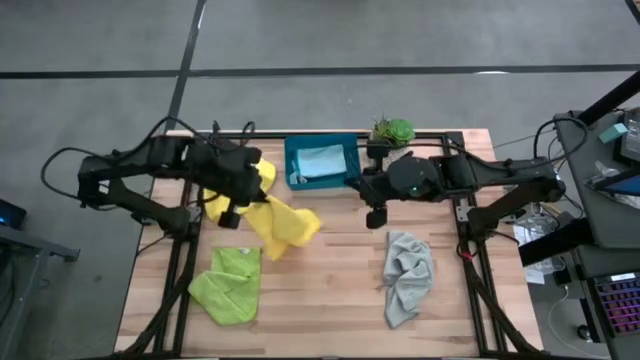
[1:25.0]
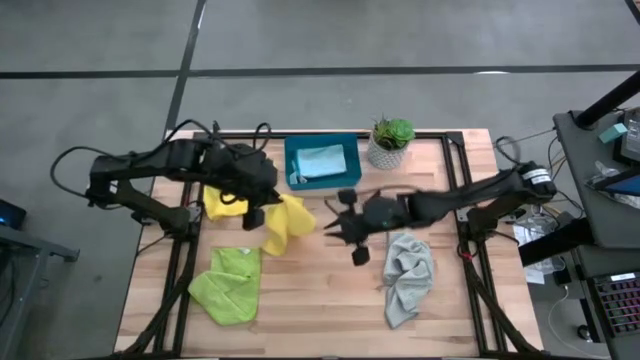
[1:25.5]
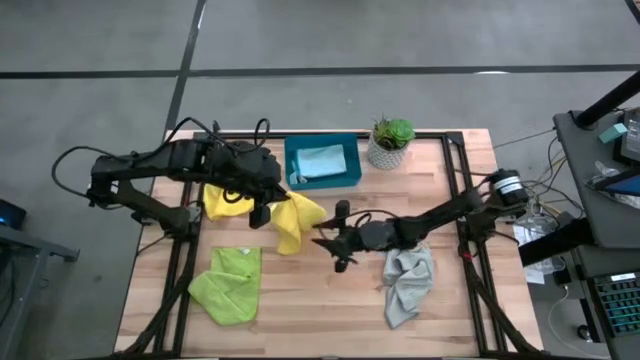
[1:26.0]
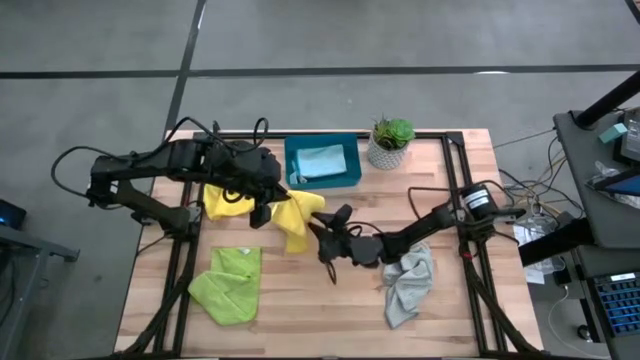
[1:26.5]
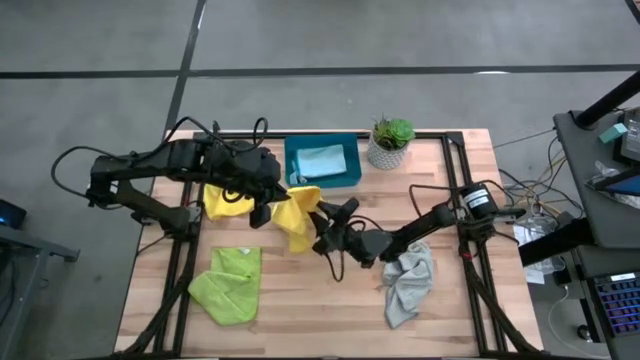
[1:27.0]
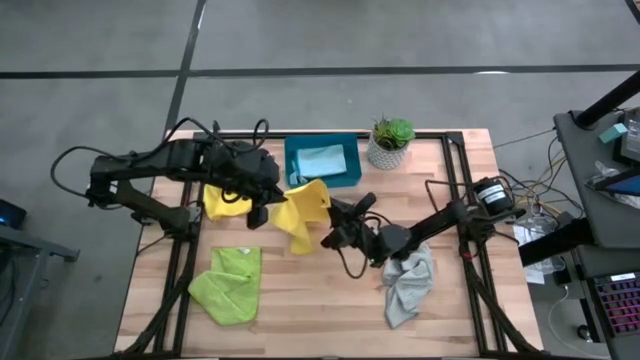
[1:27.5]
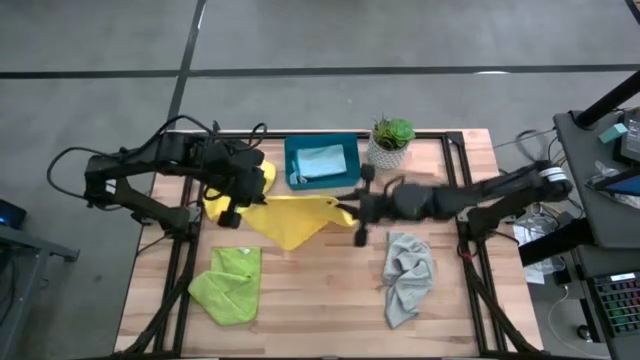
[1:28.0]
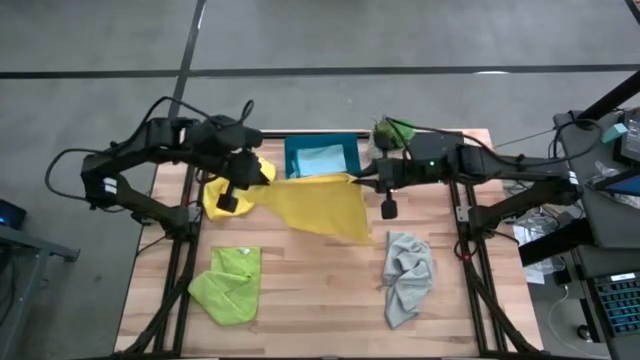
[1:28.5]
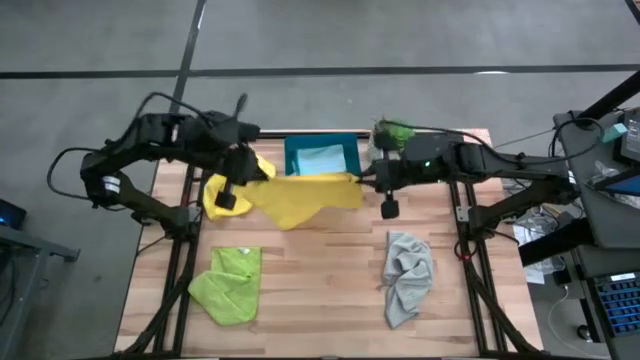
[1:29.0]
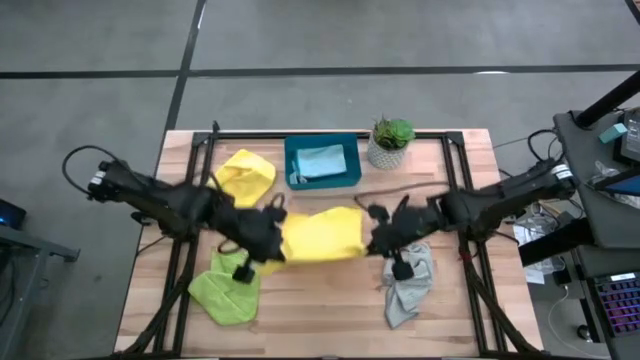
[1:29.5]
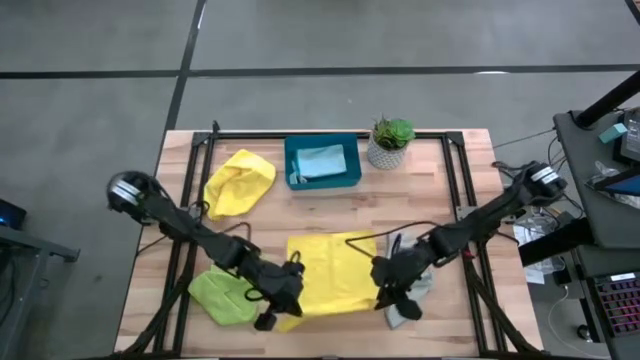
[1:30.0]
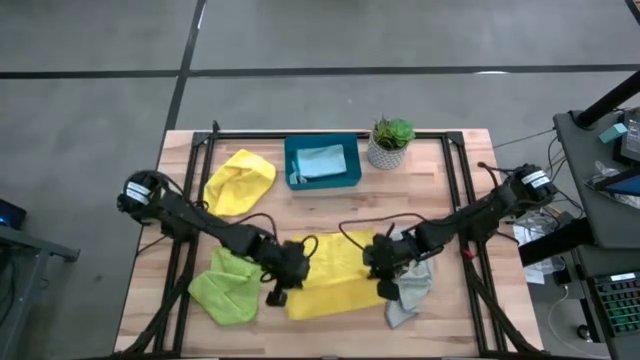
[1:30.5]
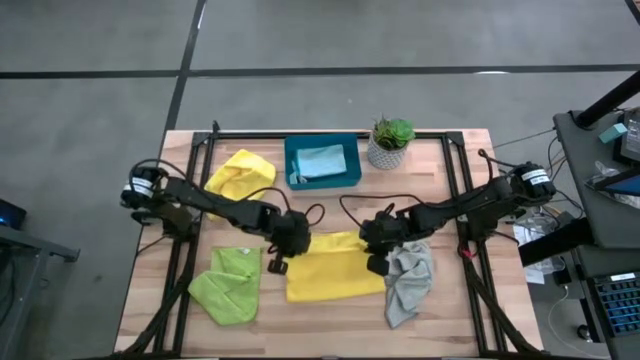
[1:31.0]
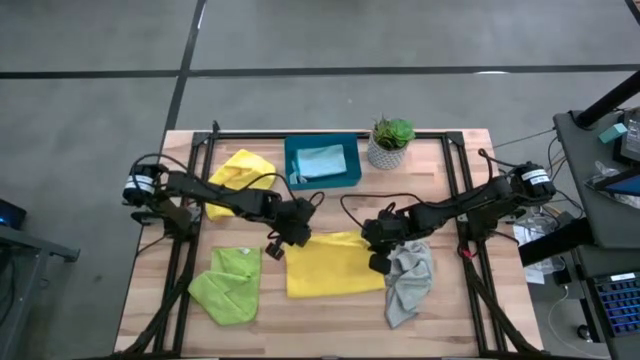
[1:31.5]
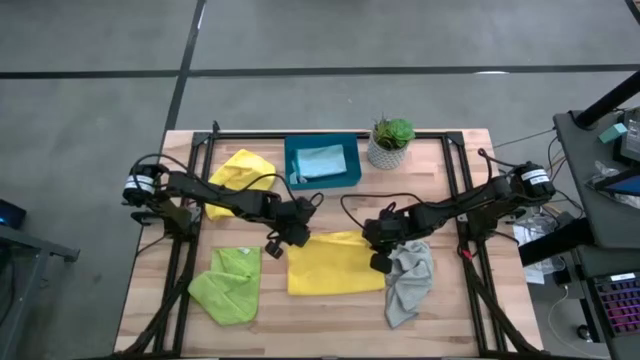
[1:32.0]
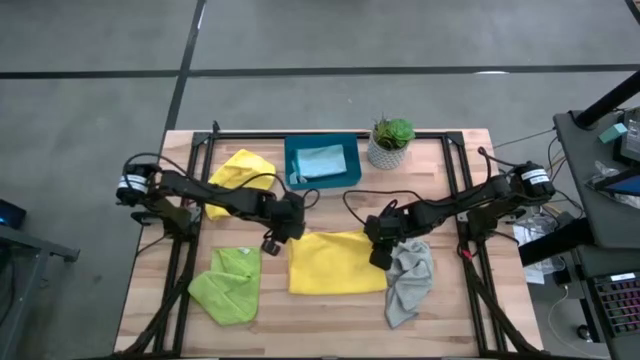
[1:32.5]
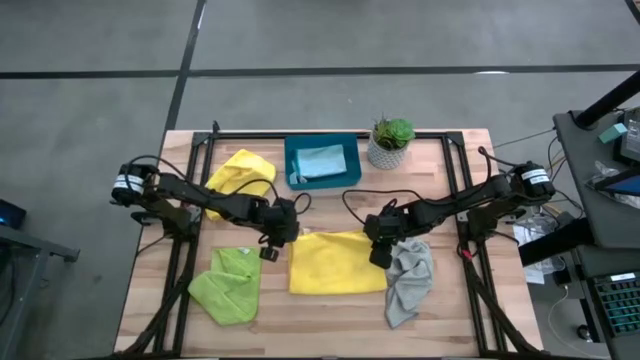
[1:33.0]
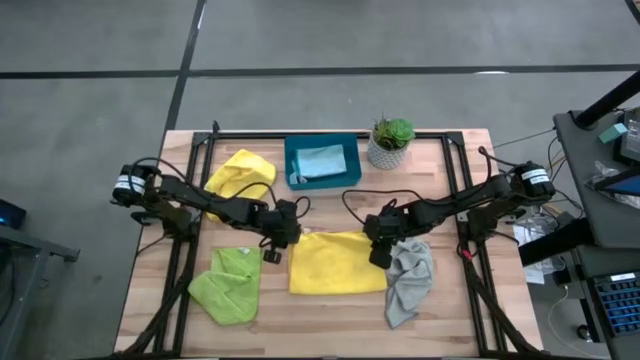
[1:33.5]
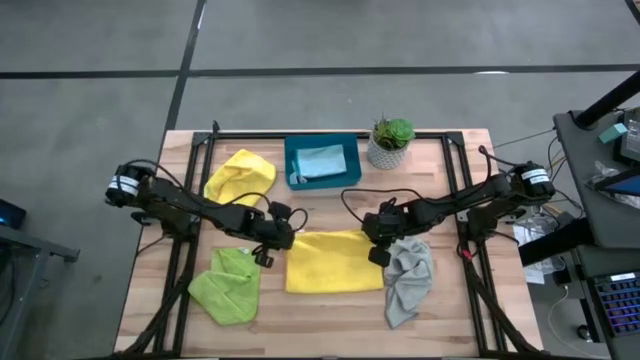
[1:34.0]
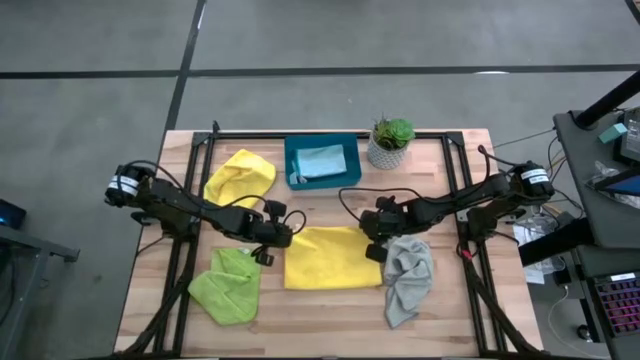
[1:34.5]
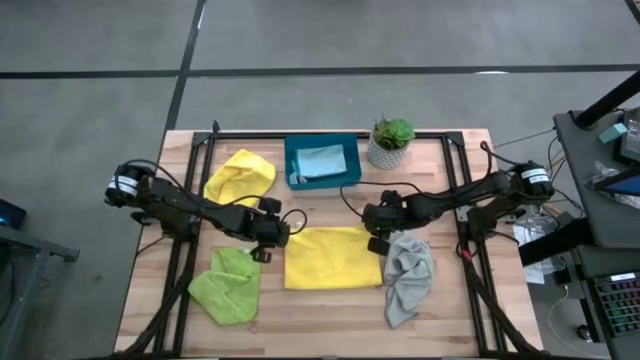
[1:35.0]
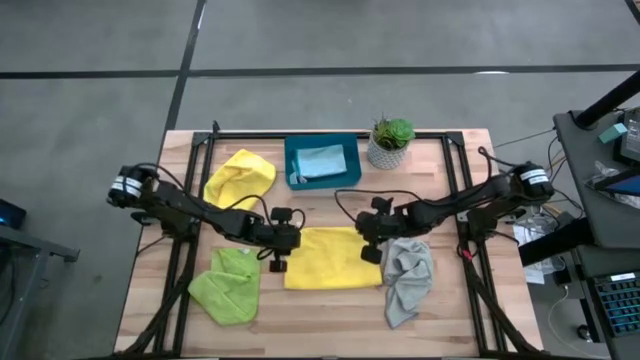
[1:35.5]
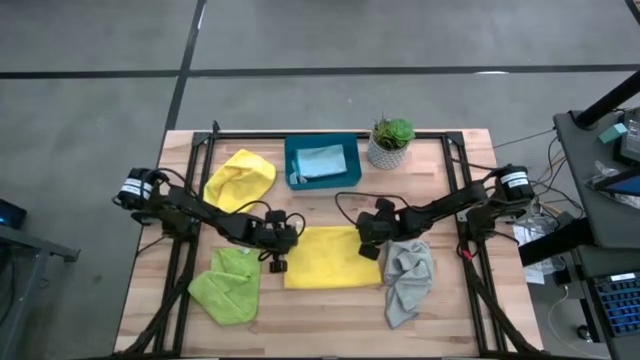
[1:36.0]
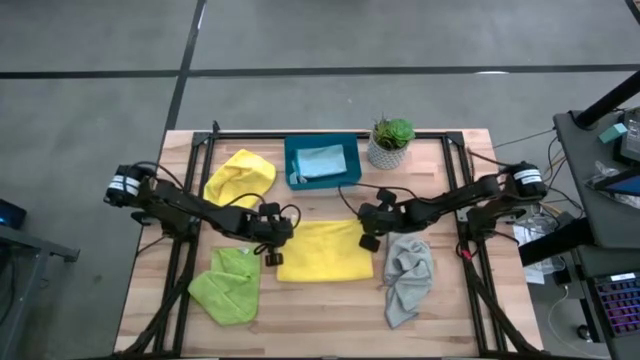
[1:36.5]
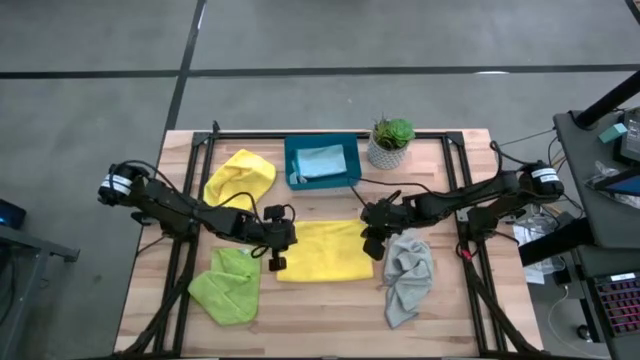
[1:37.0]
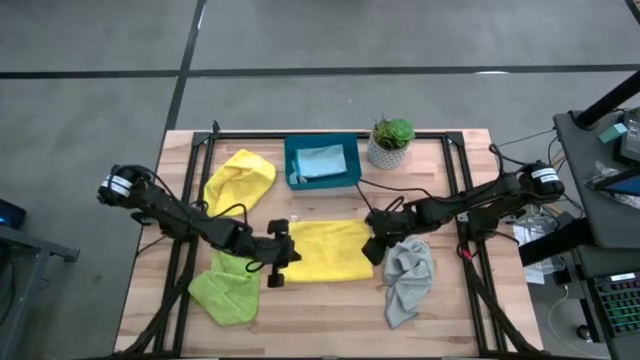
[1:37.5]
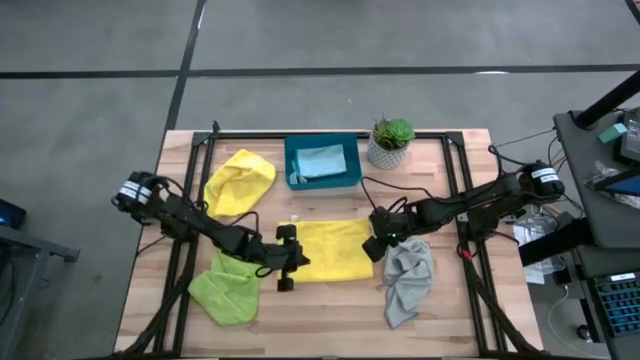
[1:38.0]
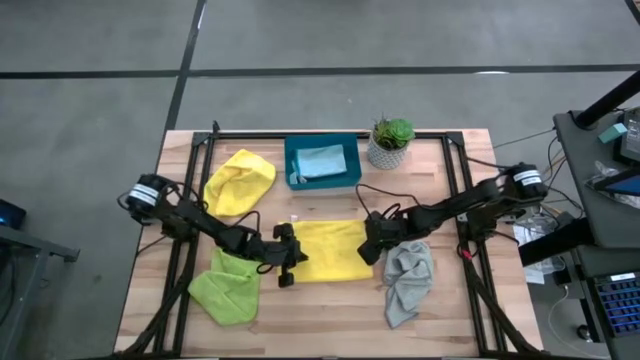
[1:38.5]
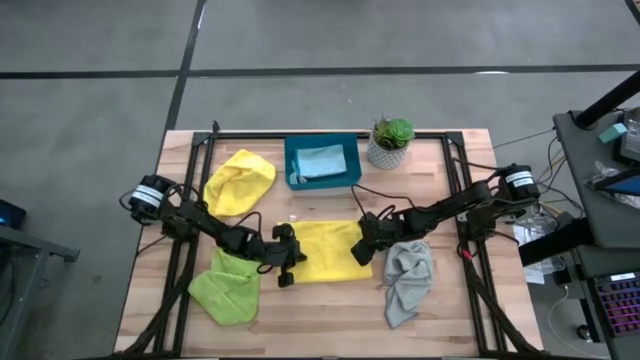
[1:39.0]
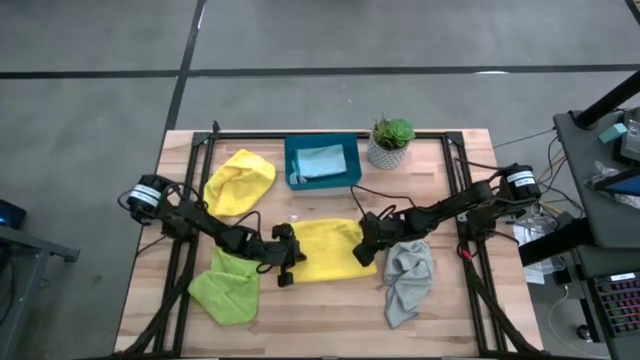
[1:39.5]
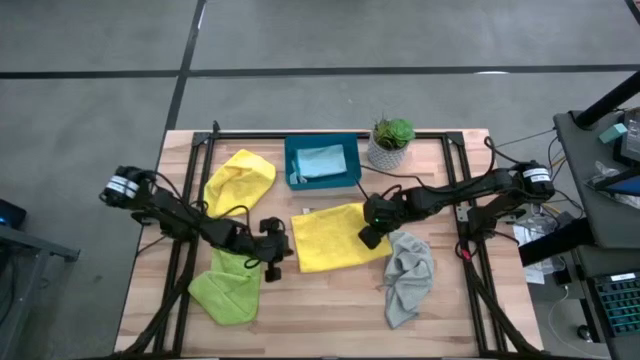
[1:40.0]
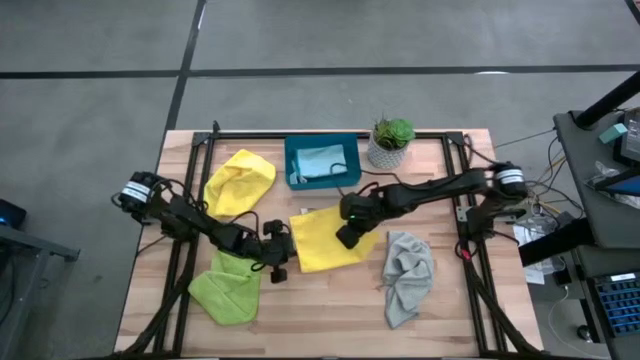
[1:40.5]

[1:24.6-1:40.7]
Task: Fold microfiber towels
Fold the right yellow microfiber cloth

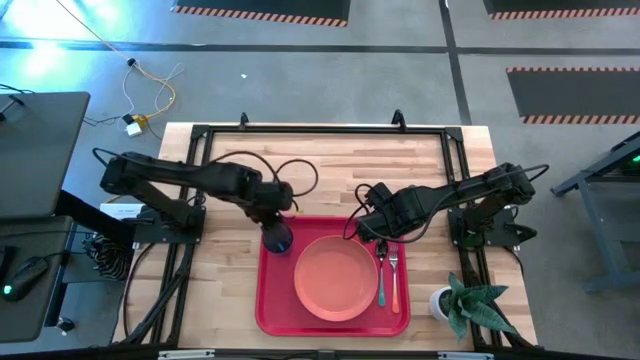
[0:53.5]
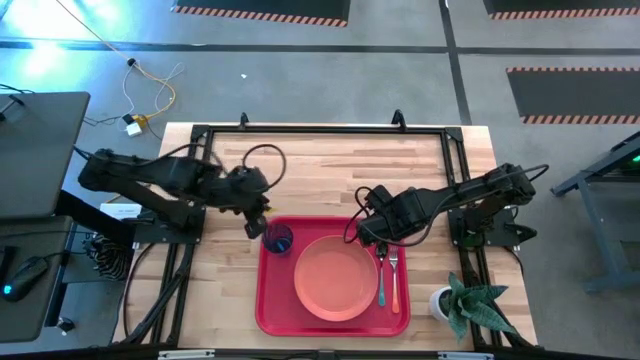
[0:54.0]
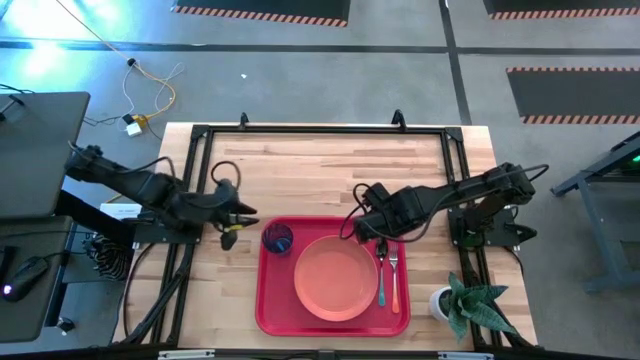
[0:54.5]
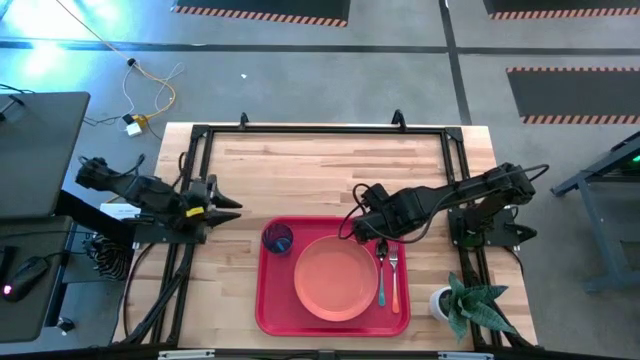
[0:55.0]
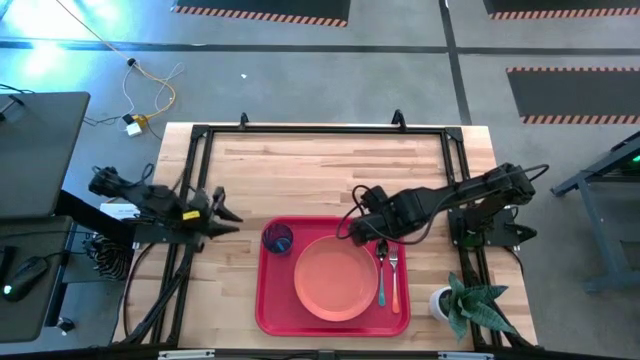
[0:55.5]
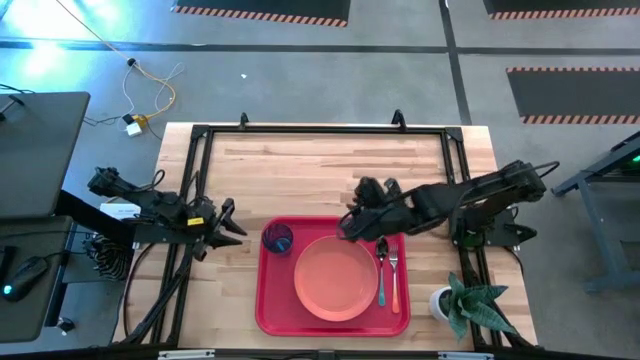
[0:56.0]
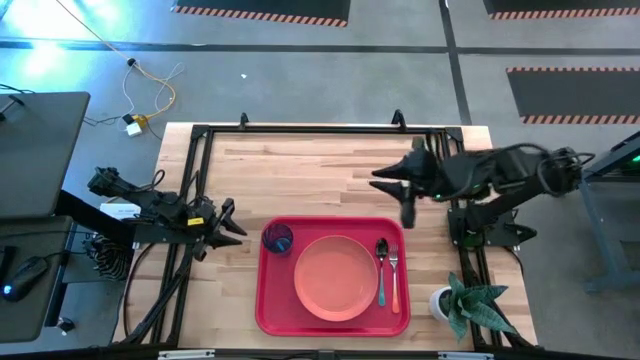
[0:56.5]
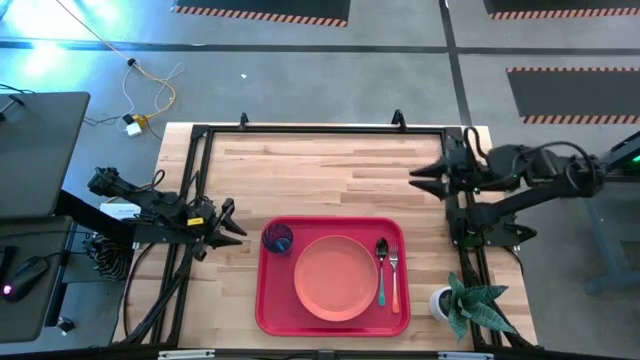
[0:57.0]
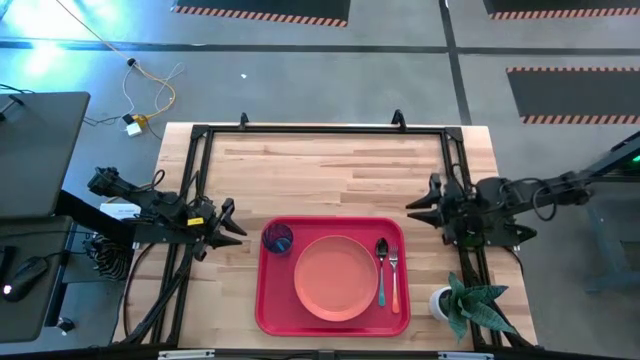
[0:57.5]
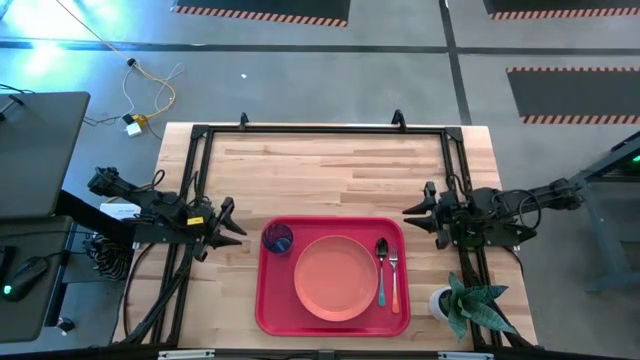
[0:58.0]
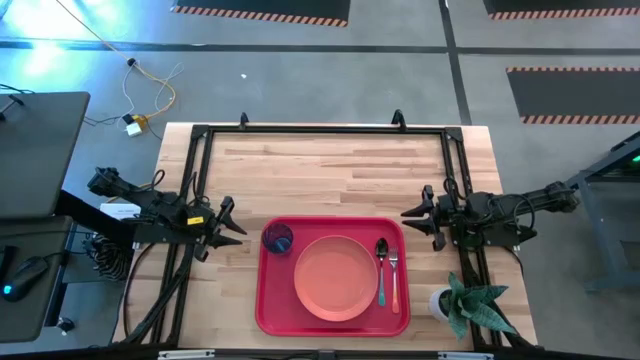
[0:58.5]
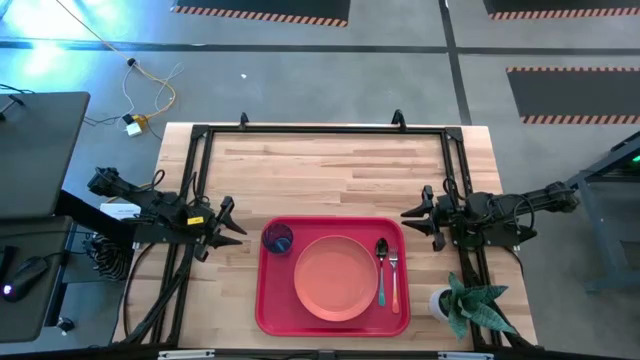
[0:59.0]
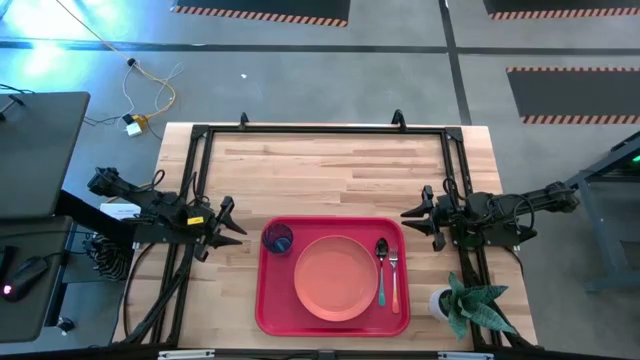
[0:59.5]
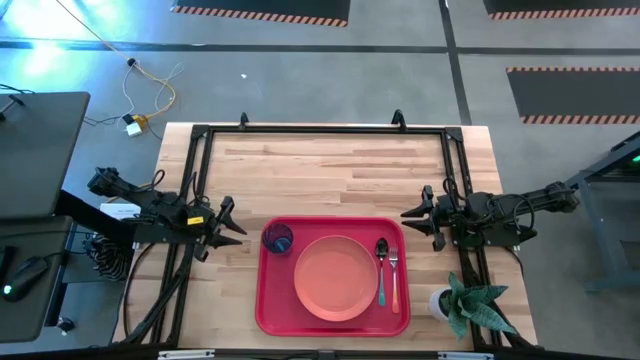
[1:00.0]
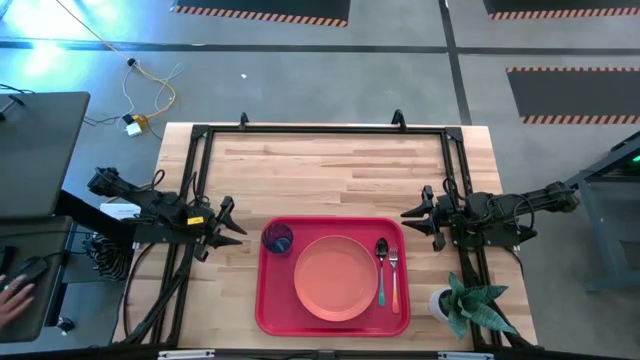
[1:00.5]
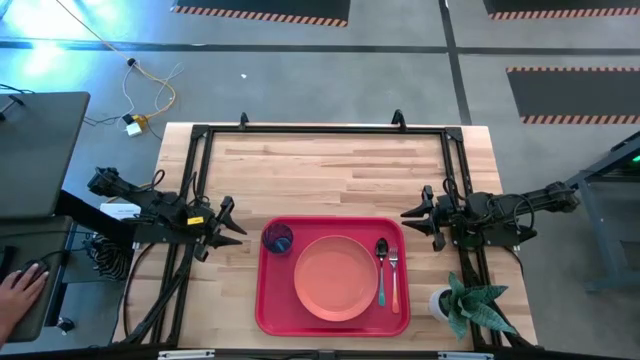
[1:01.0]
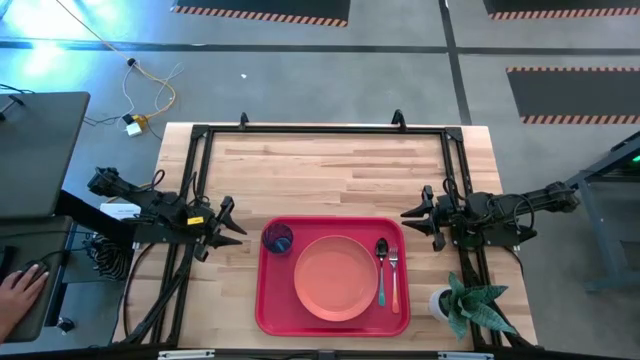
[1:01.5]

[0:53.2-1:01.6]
Task: Pick and place plate/cup/fork/spoon on tray
Return to Home Position
